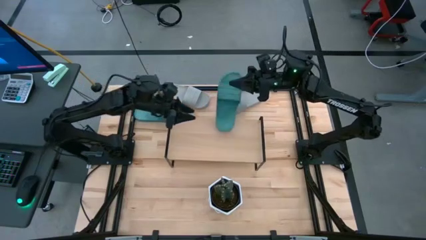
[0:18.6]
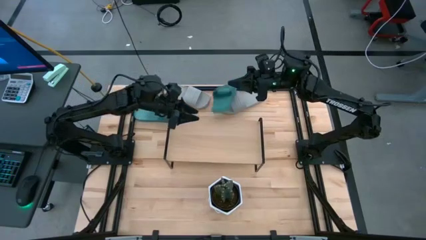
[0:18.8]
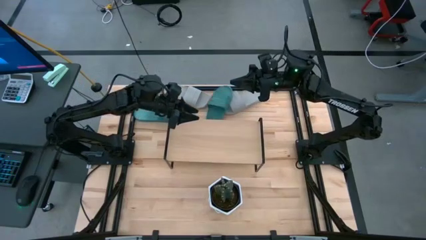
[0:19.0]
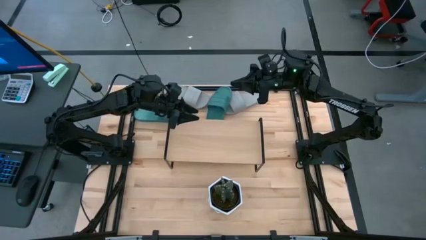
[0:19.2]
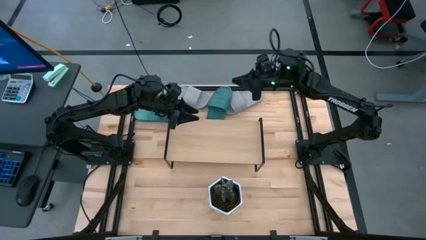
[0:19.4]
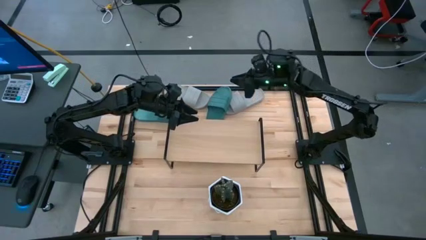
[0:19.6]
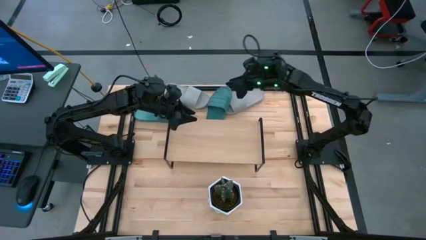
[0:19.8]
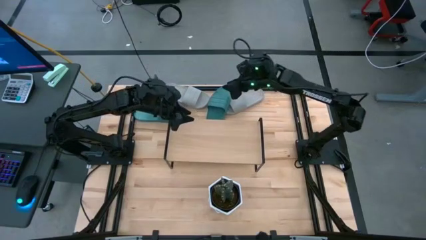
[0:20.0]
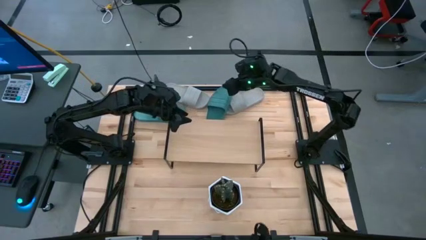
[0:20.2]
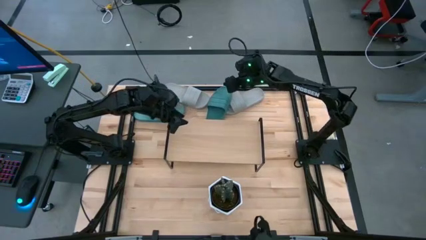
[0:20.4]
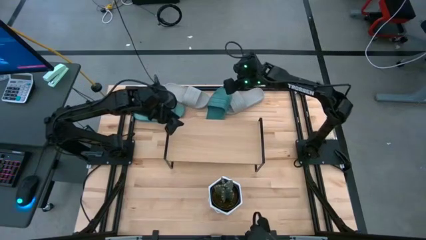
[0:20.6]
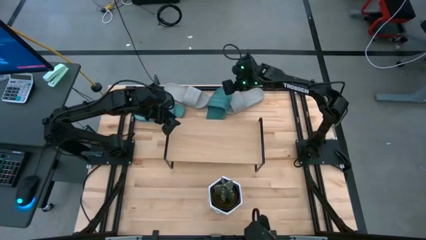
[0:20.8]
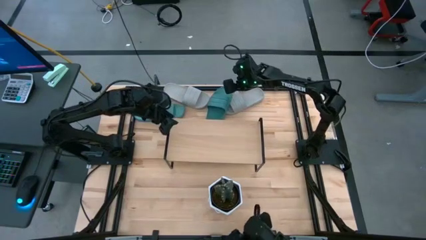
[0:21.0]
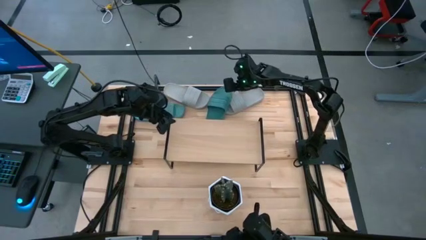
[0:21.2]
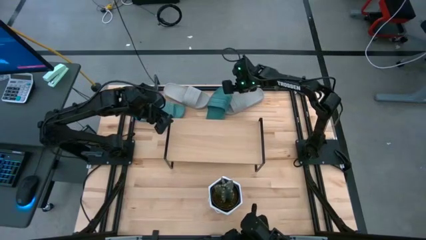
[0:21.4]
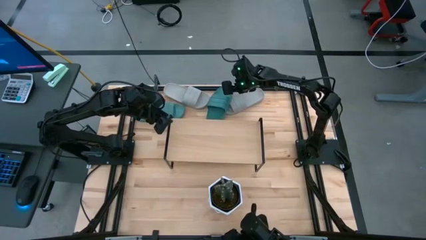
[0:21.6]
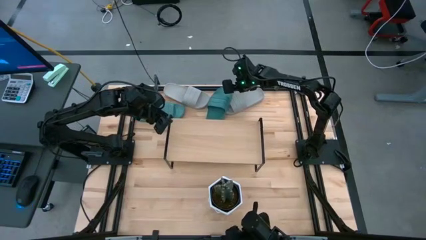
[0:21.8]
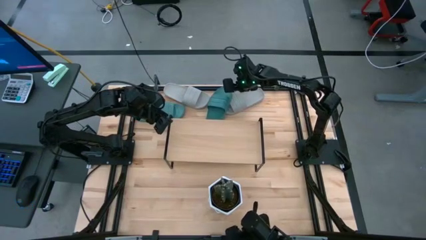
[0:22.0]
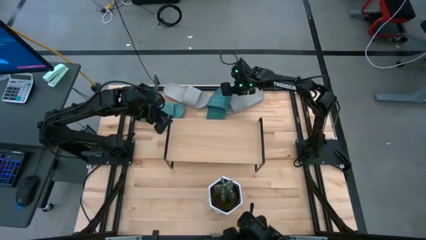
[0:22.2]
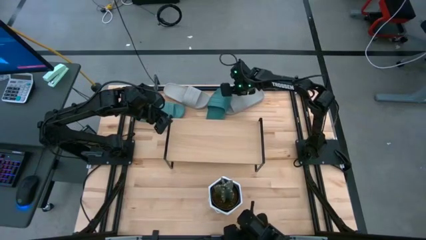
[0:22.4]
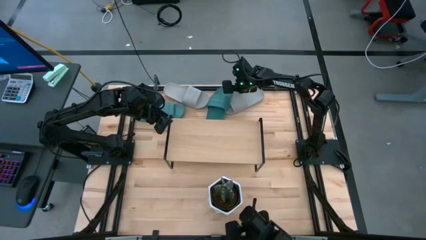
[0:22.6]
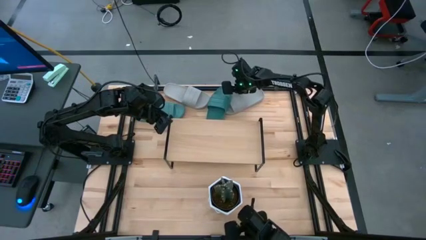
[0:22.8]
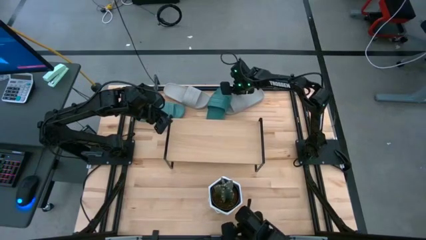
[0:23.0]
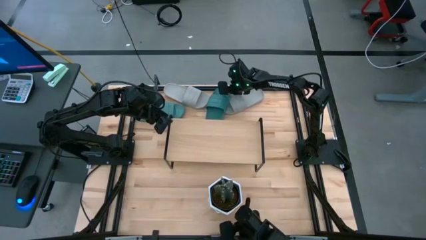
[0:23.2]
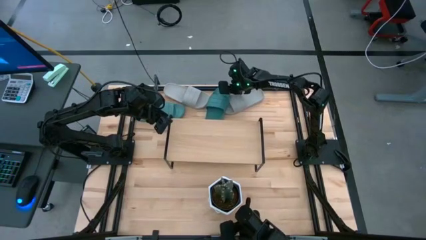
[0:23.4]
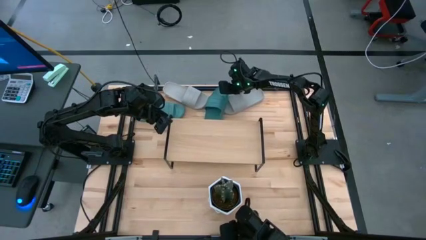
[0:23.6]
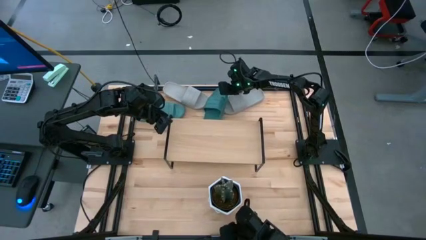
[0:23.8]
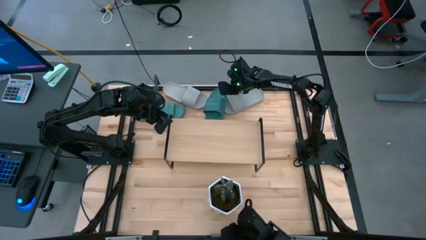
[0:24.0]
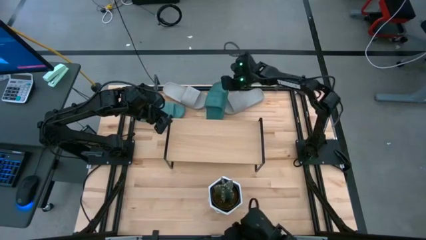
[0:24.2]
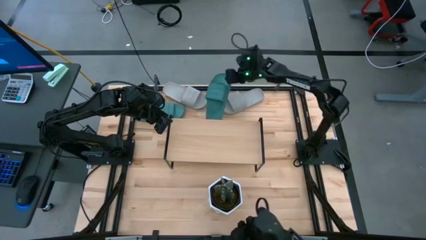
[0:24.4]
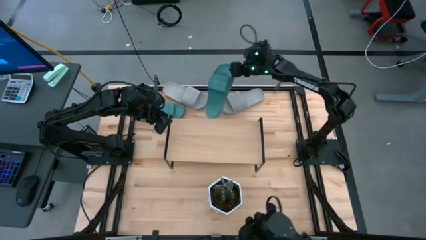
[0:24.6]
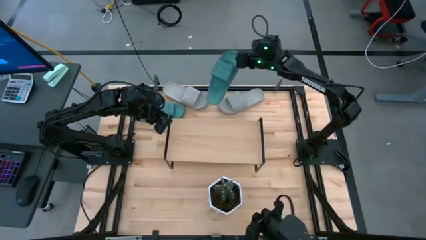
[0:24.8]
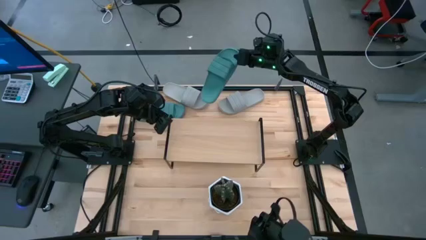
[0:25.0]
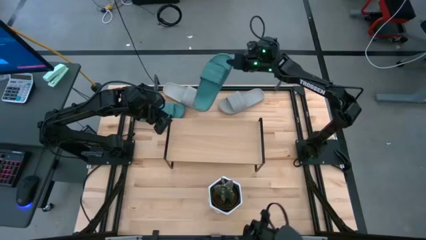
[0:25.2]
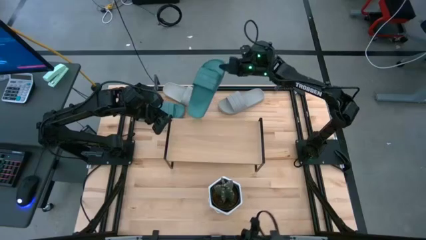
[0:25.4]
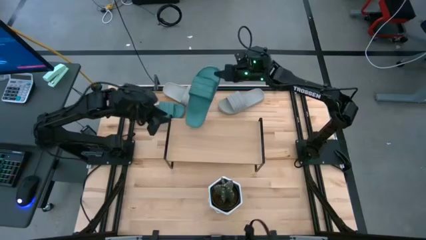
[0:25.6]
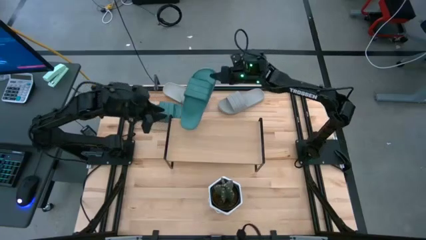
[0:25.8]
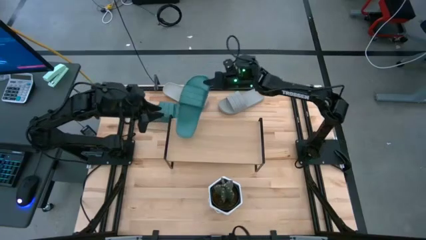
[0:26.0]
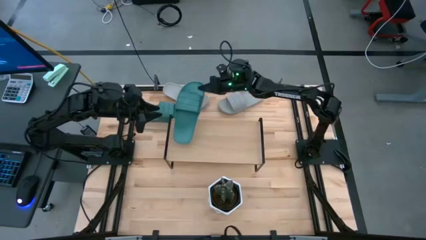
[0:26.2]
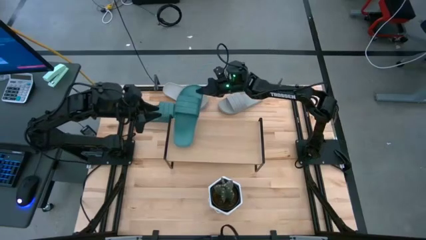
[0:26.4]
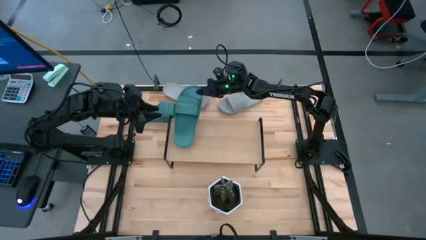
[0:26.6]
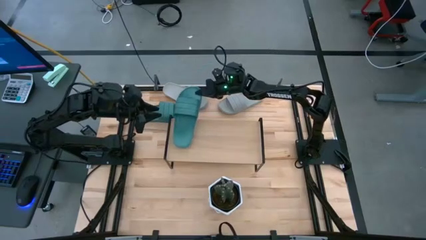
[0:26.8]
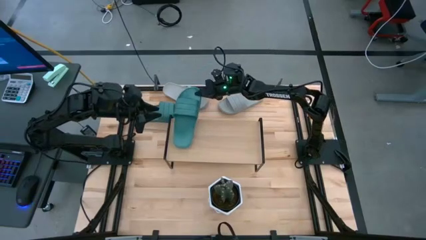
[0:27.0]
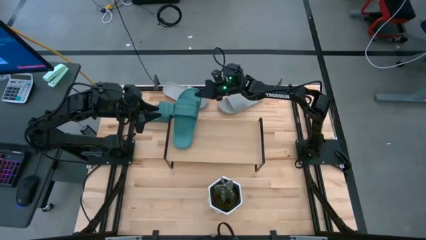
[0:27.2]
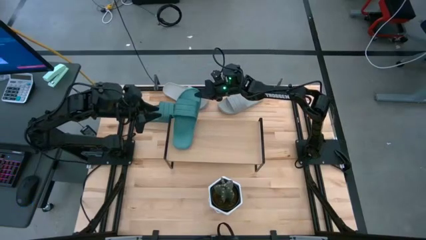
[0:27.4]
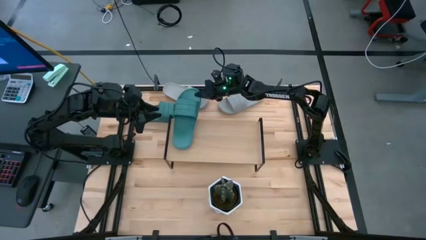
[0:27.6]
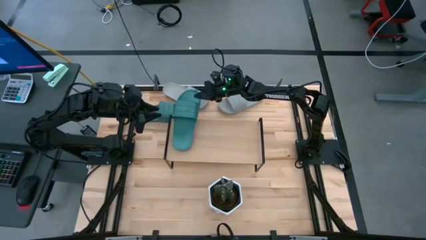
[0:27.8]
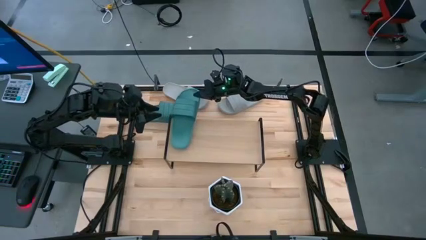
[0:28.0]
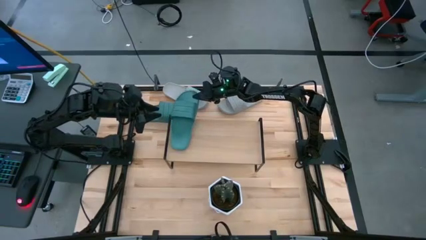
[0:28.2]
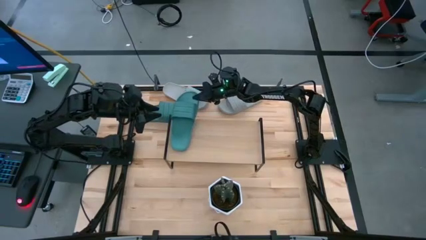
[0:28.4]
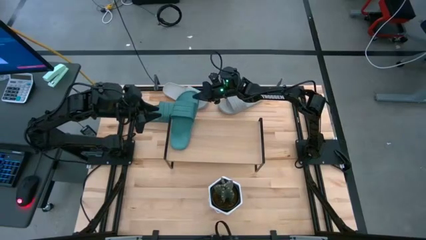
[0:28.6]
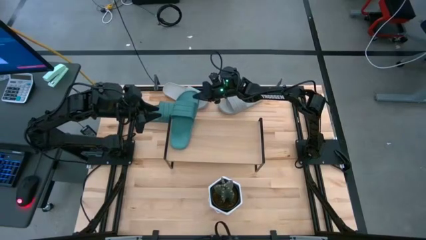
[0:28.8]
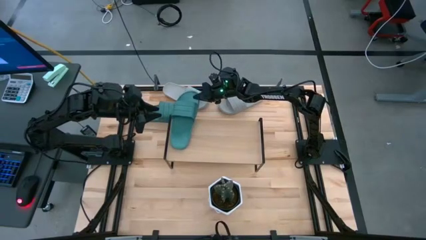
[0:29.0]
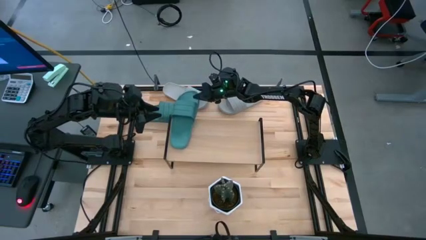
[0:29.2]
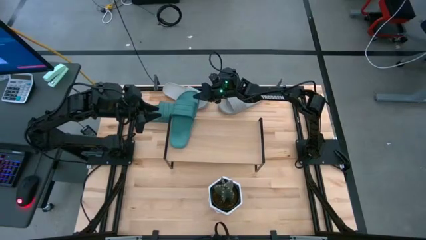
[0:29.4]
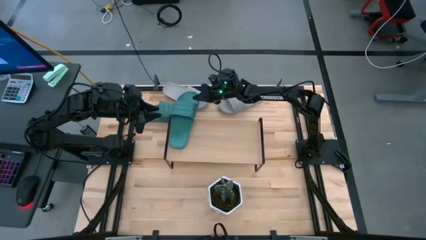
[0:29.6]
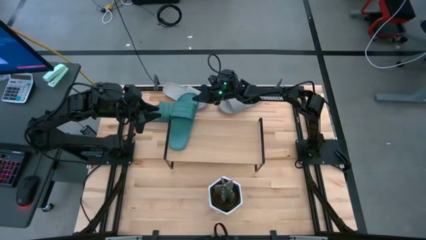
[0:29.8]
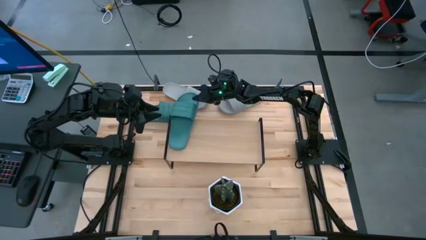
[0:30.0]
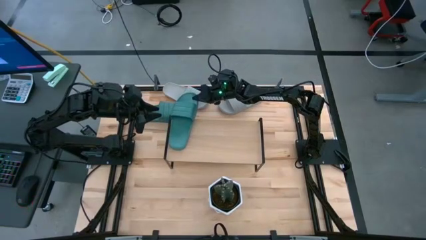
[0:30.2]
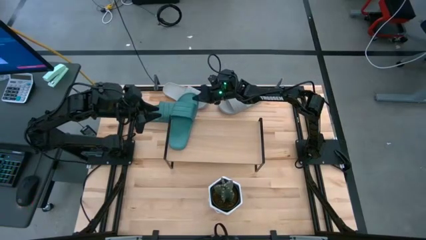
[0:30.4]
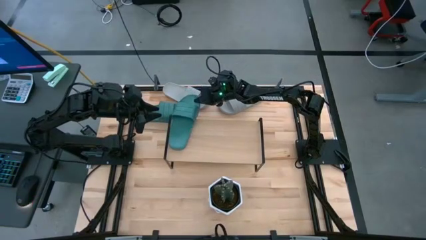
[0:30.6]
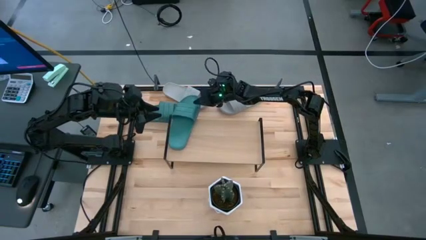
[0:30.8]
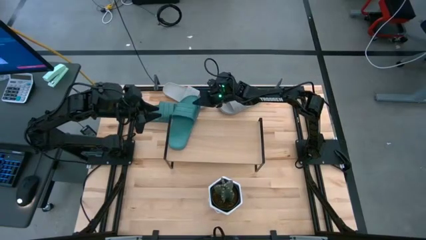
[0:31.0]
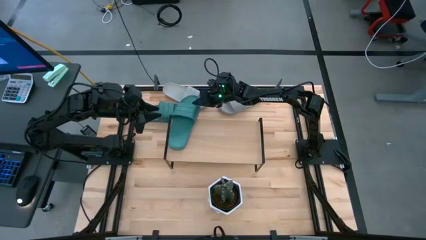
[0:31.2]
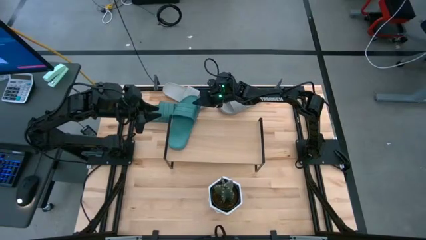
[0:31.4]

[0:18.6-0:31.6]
Task: Pick and place slides into the shelf
Put the right green slipper on the shelf
